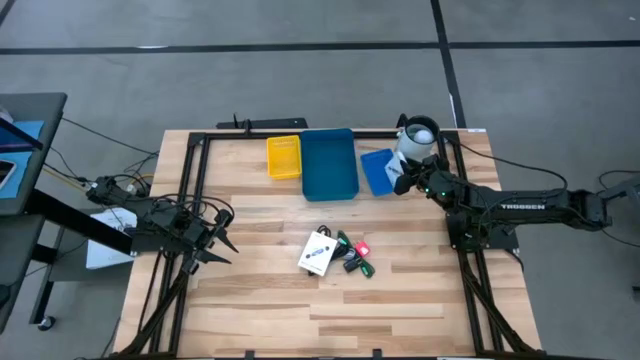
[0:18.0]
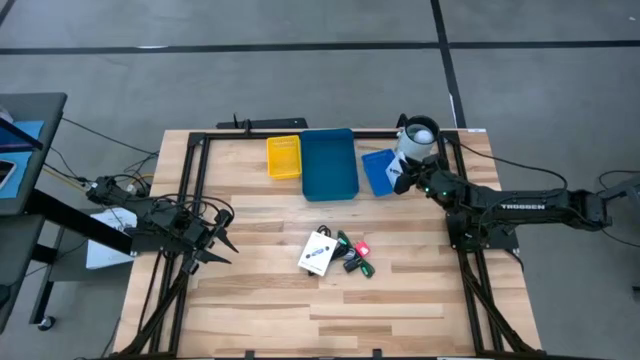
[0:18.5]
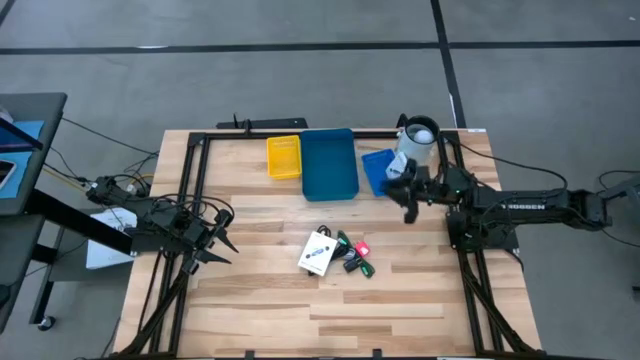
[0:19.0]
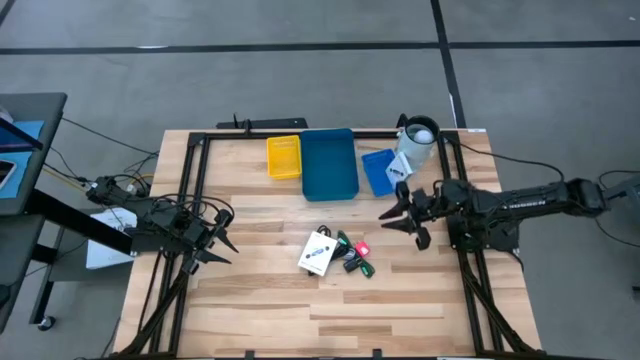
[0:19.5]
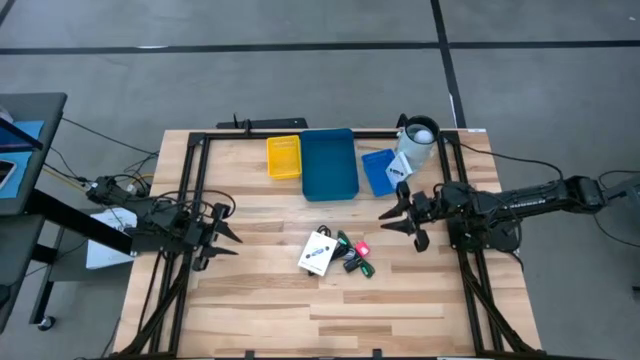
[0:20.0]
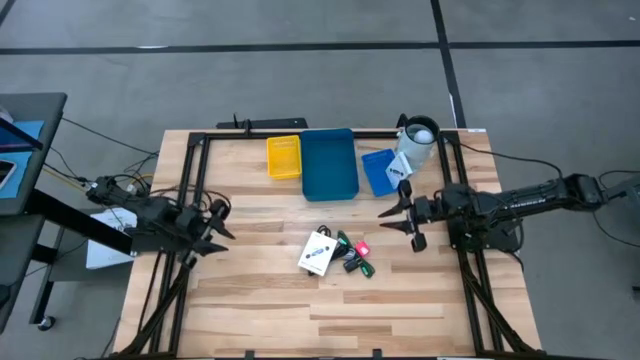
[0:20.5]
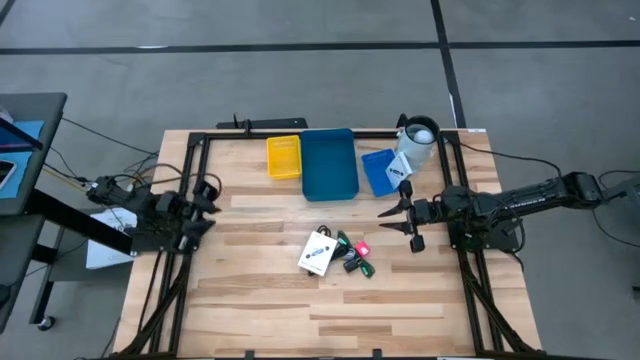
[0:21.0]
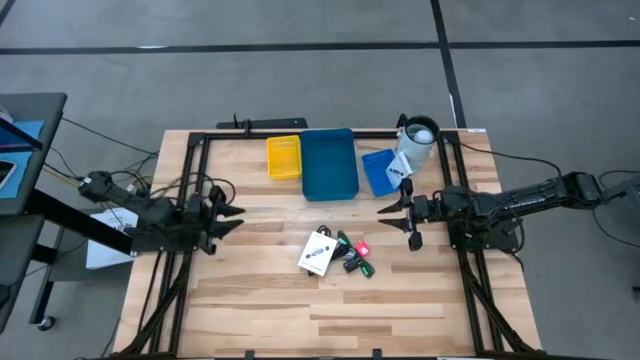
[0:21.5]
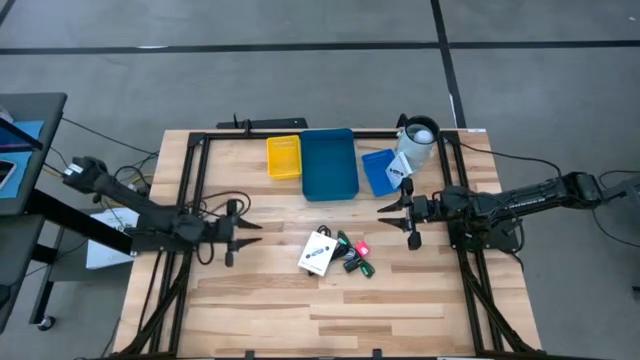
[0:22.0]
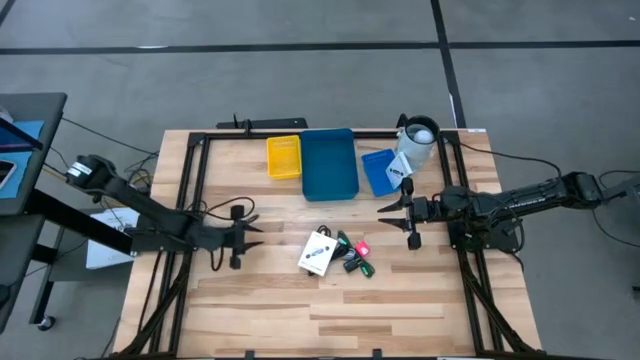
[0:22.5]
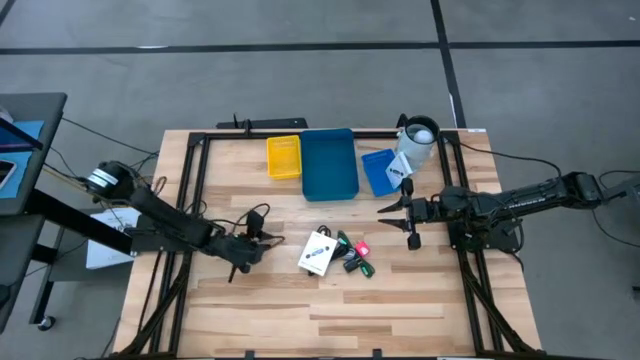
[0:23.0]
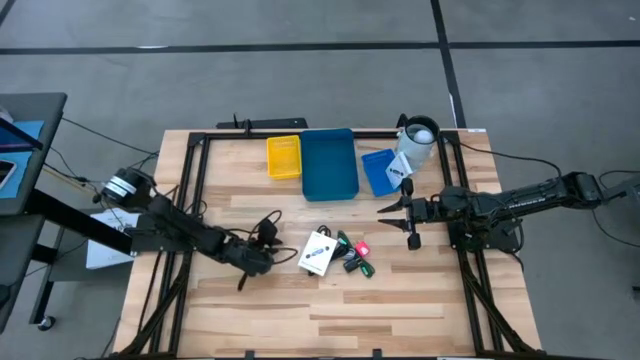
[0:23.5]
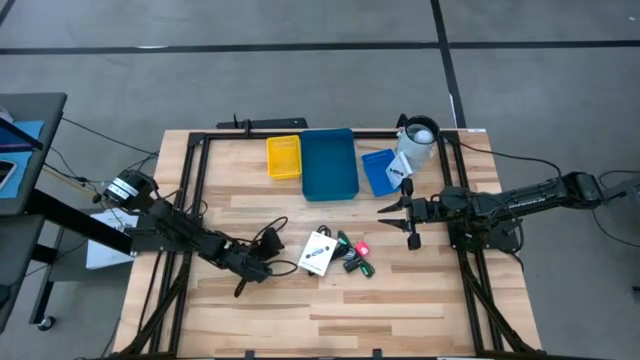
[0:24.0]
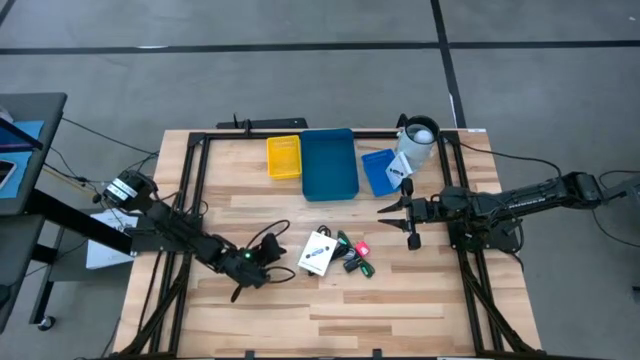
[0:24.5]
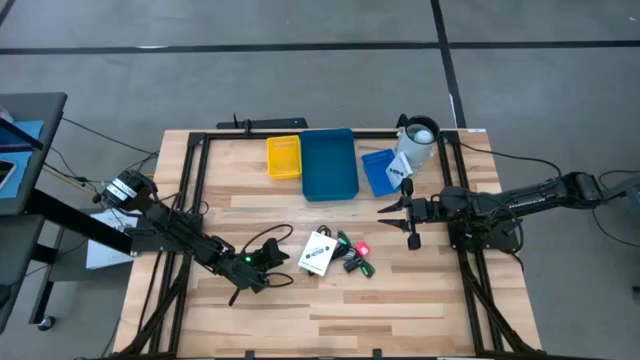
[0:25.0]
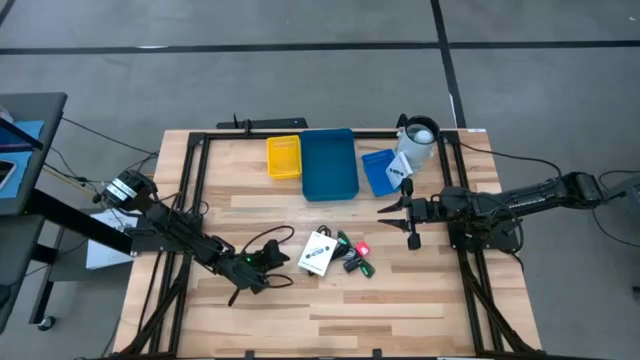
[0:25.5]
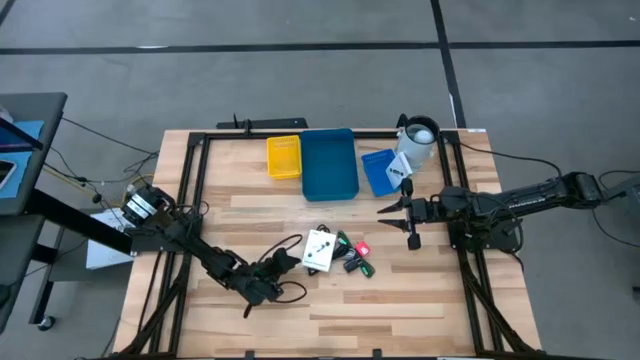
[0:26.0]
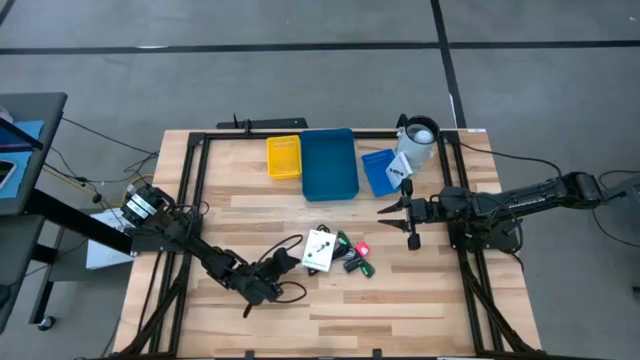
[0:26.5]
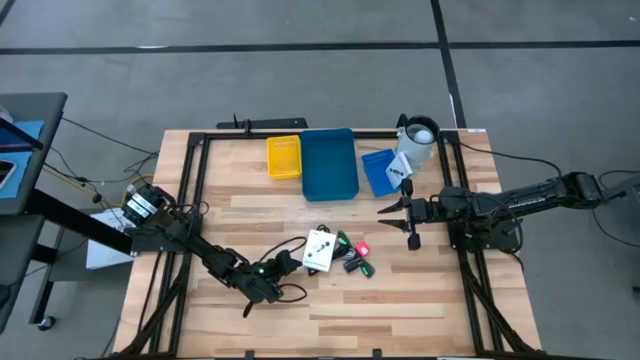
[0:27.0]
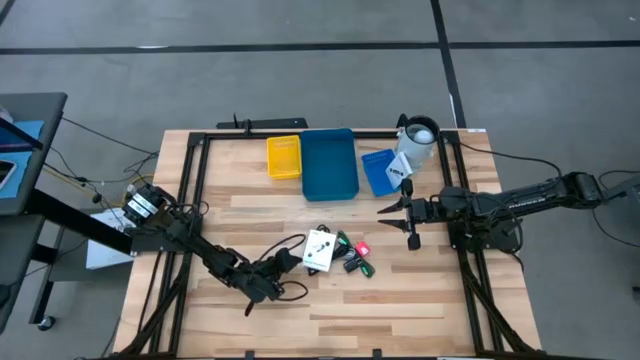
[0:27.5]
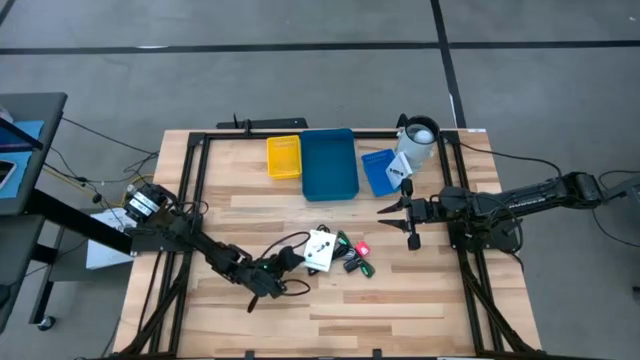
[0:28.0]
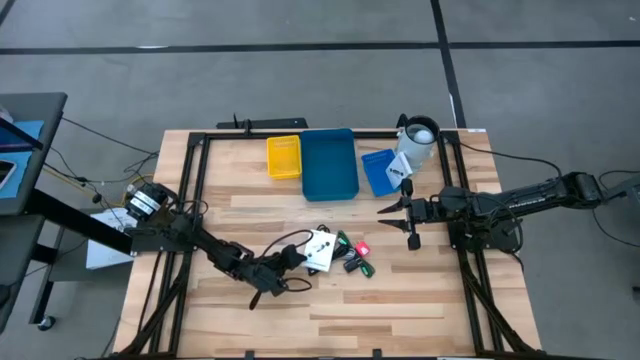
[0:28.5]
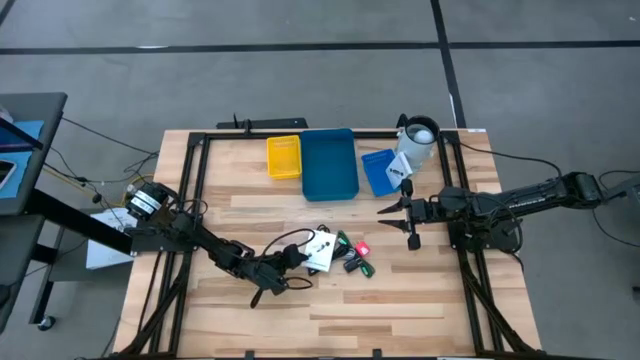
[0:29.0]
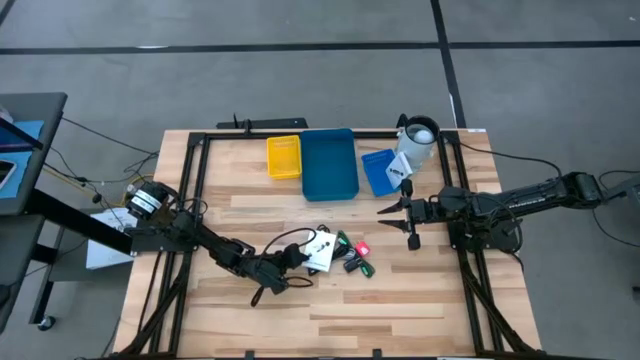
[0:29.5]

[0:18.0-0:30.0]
Task: Pick and place items into bin
Put the white card reader box into the blue basket

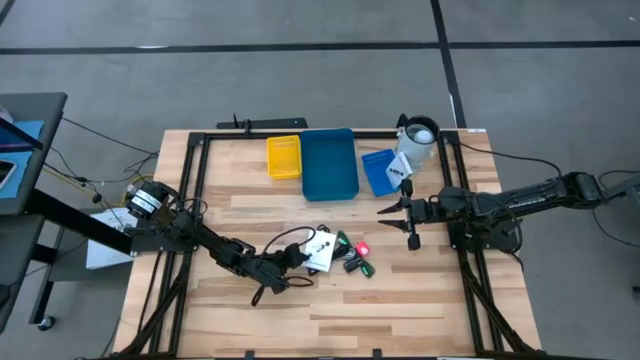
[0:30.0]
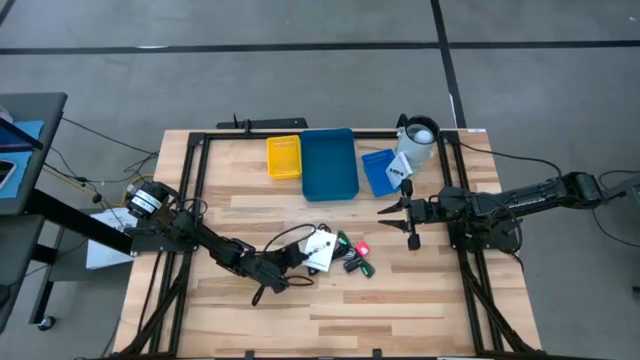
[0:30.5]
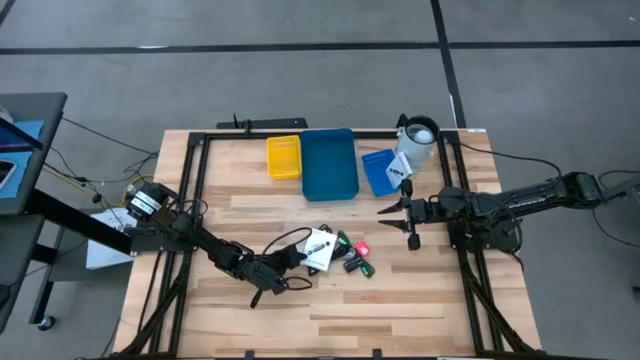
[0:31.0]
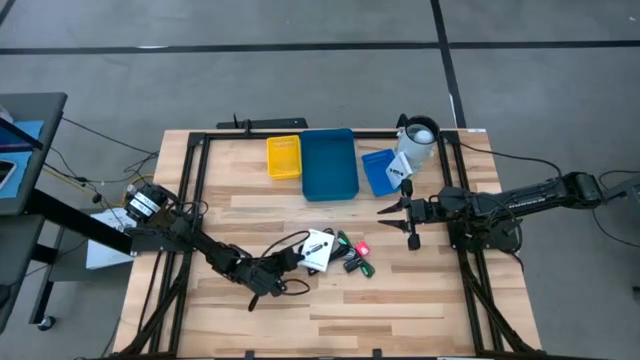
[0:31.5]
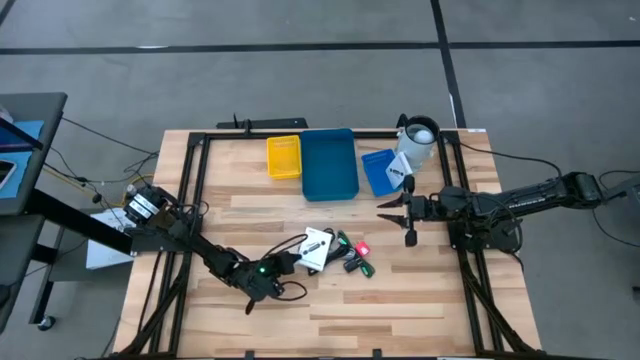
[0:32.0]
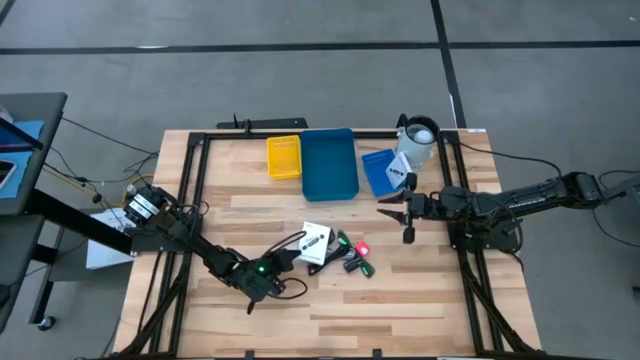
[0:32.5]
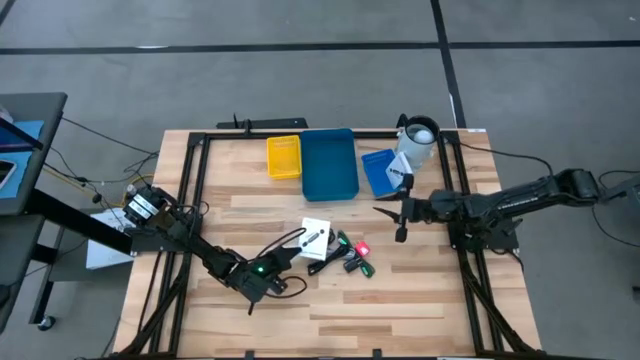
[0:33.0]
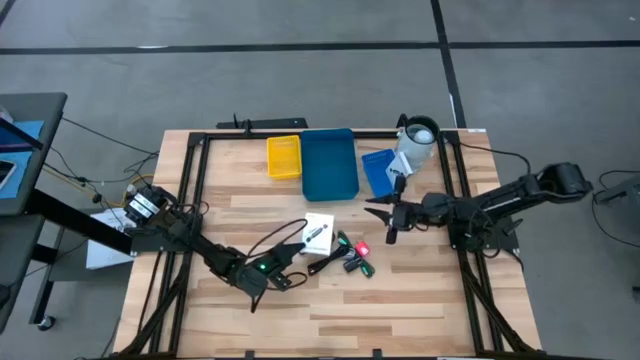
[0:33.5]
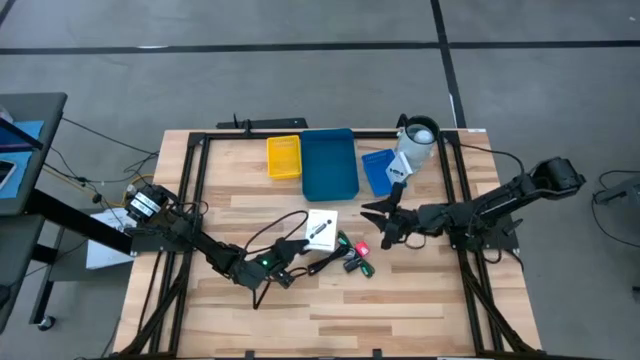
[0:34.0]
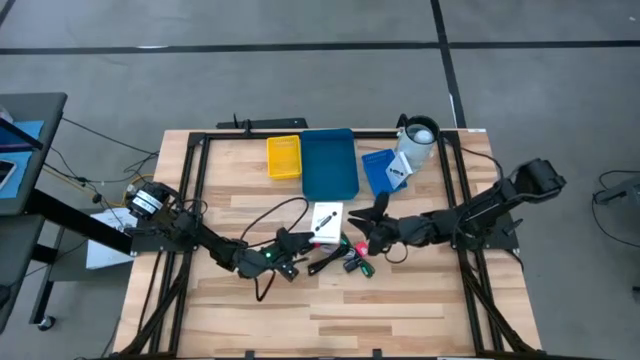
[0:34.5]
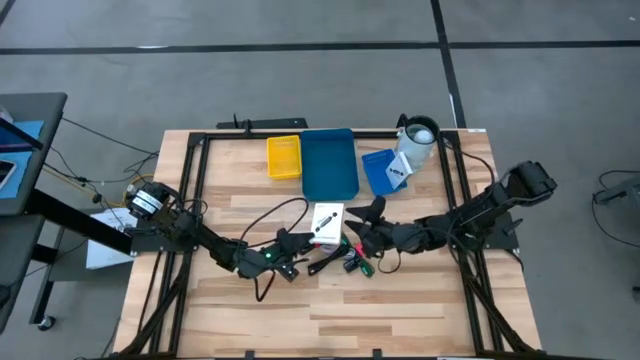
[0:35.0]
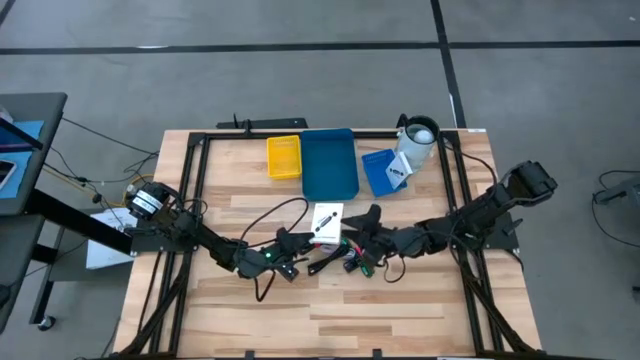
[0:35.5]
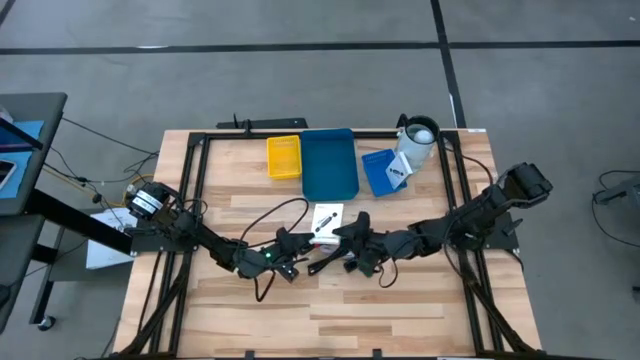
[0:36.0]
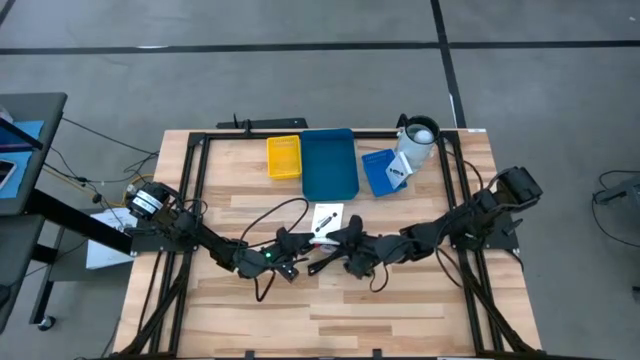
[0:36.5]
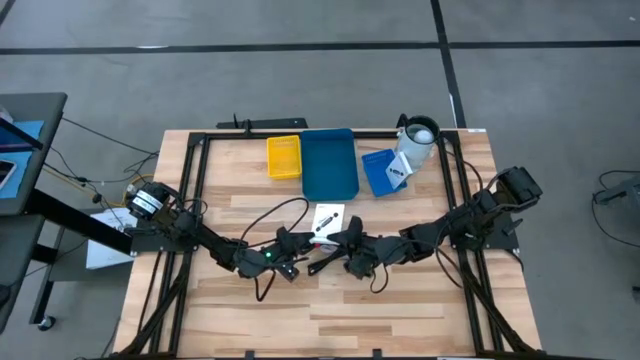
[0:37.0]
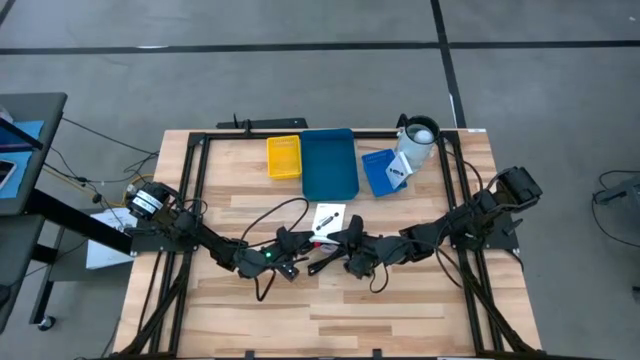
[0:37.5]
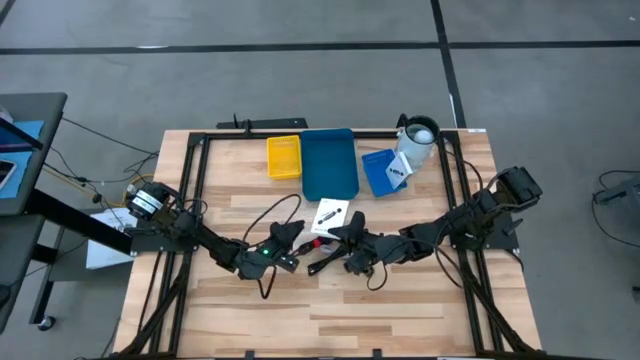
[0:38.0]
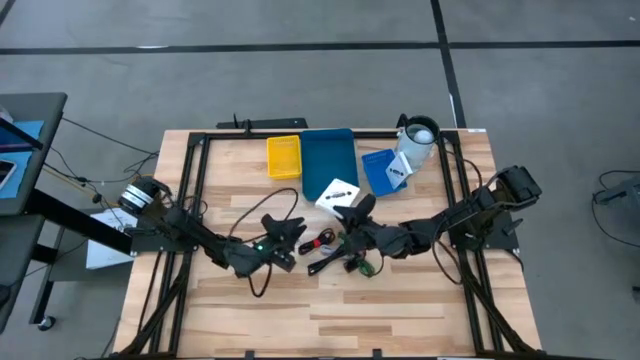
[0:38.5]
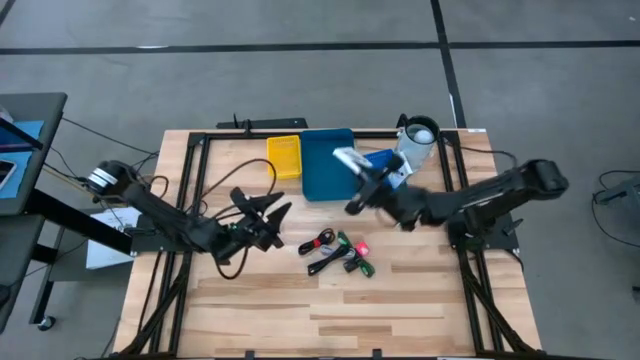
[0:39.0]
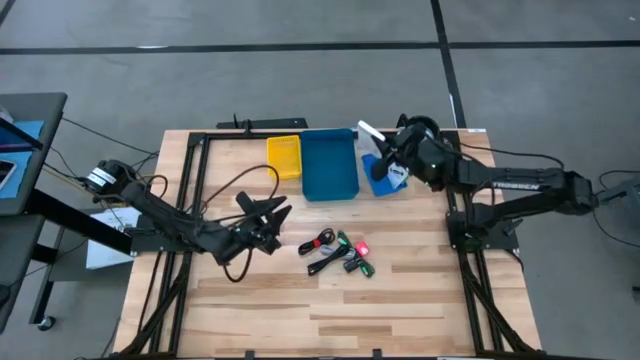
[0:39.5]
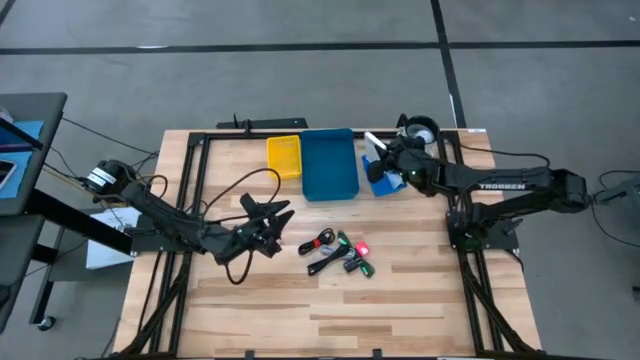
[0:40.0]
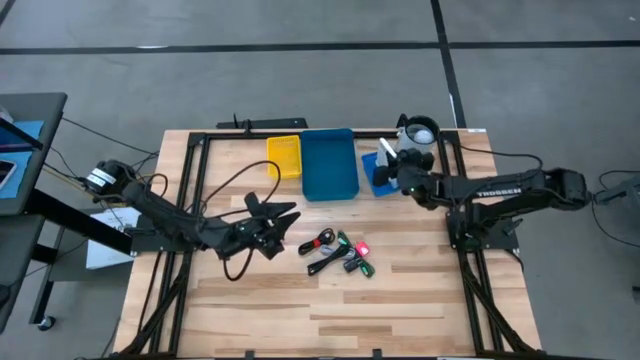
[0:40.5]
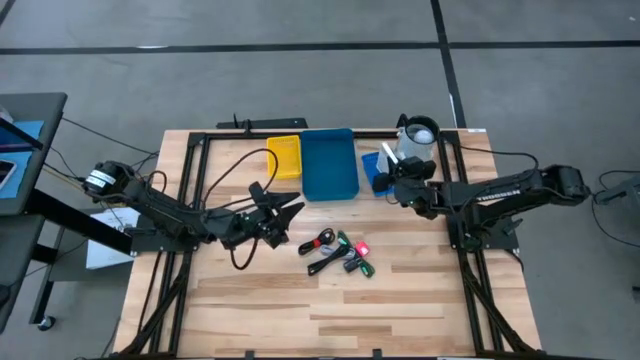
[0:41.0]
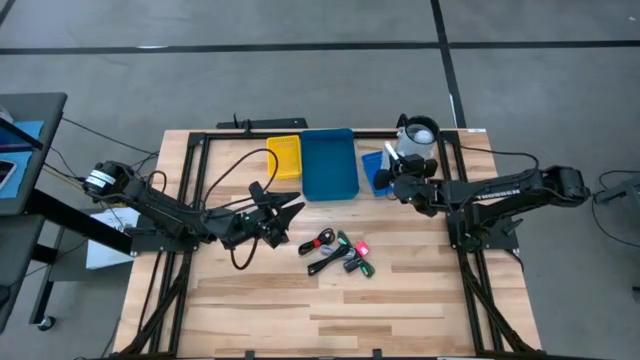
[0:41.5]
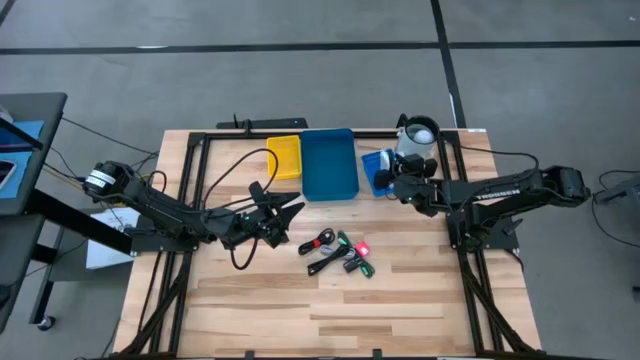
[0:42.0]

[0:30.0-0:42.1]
Put the white card reader box into the blue basket
